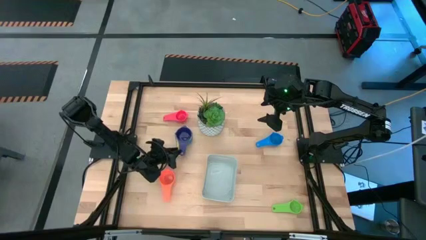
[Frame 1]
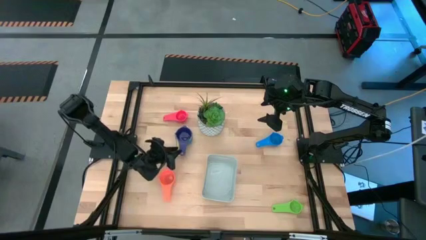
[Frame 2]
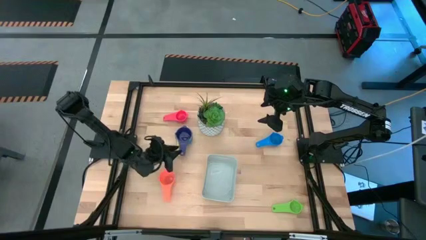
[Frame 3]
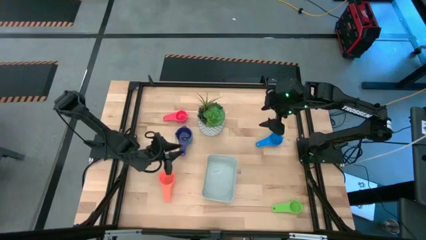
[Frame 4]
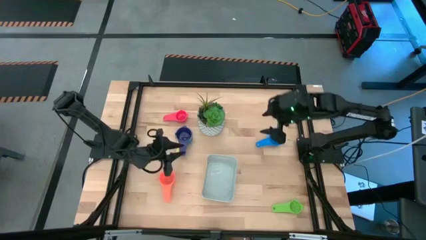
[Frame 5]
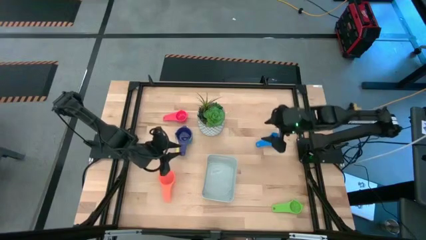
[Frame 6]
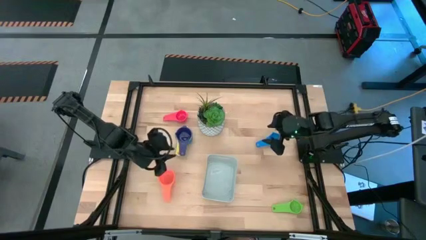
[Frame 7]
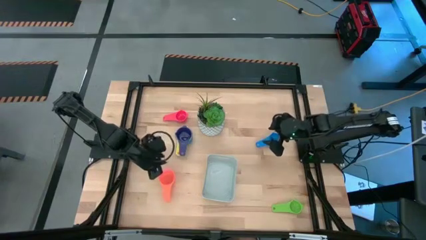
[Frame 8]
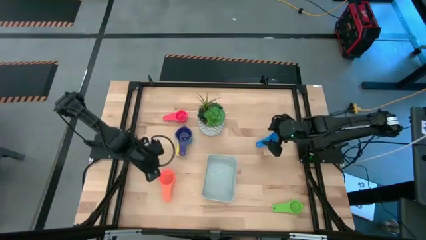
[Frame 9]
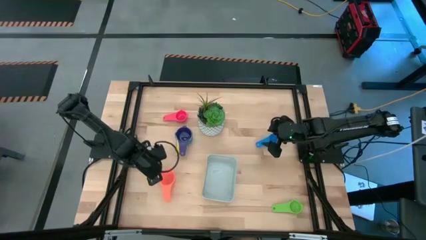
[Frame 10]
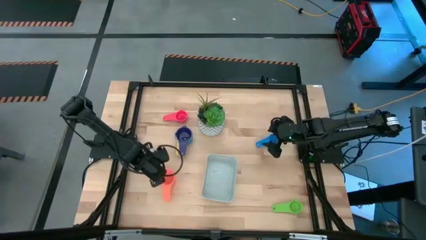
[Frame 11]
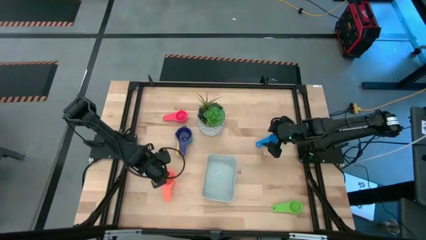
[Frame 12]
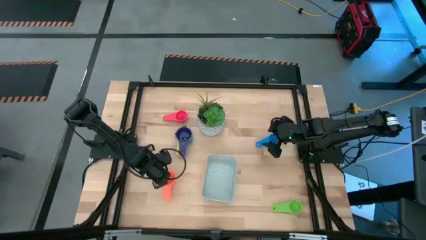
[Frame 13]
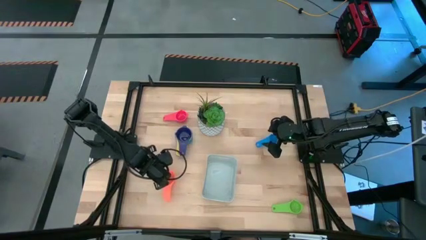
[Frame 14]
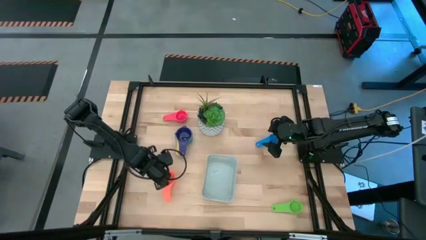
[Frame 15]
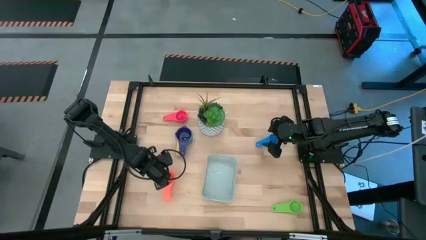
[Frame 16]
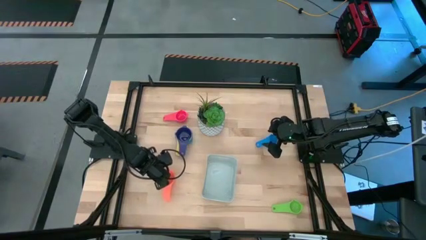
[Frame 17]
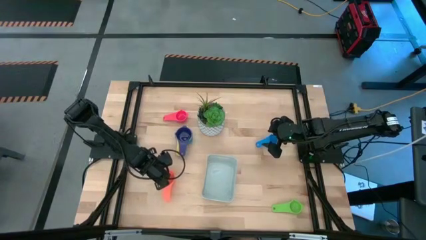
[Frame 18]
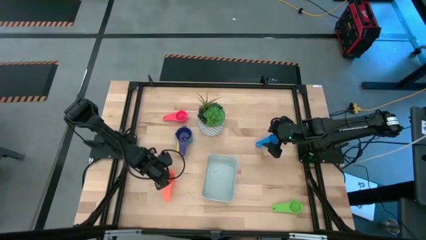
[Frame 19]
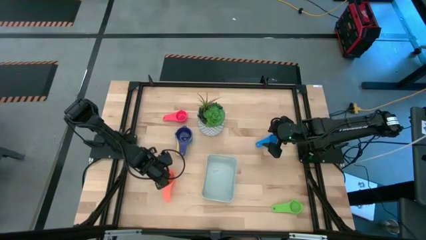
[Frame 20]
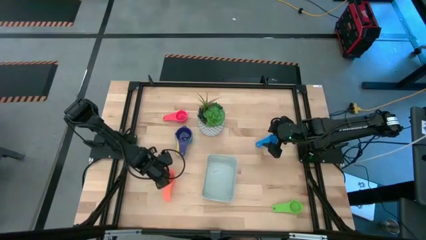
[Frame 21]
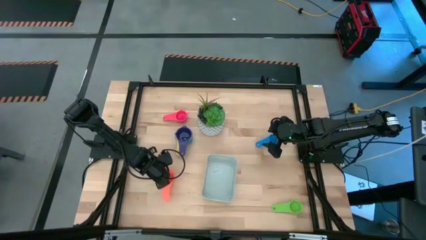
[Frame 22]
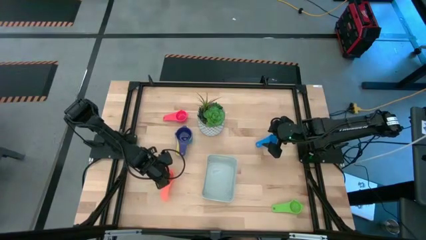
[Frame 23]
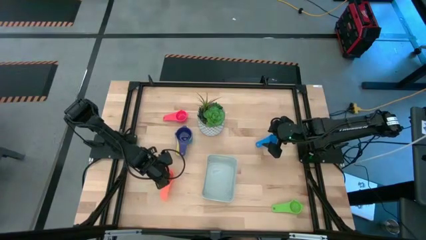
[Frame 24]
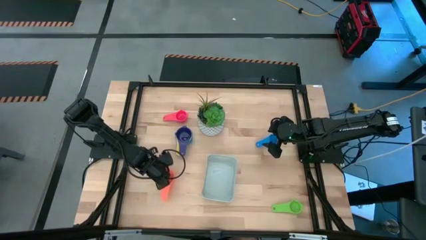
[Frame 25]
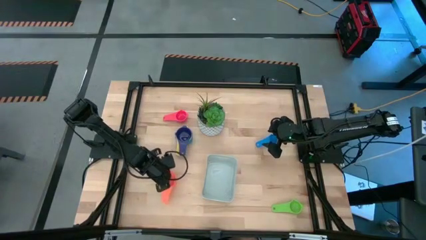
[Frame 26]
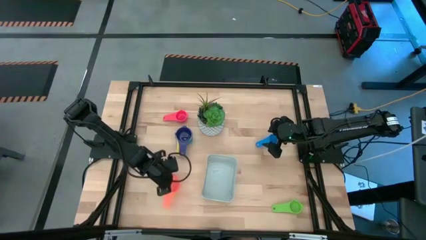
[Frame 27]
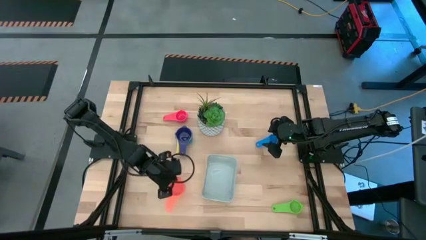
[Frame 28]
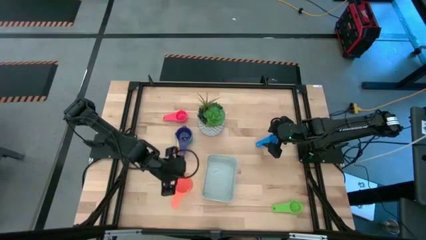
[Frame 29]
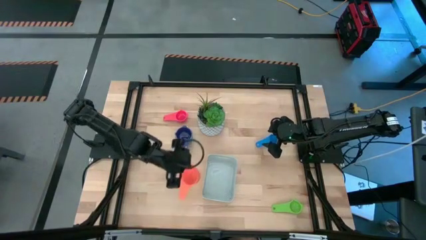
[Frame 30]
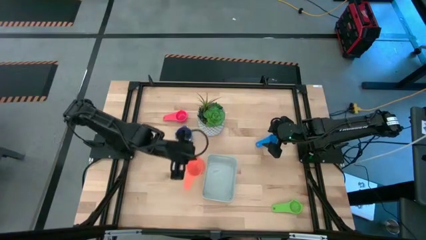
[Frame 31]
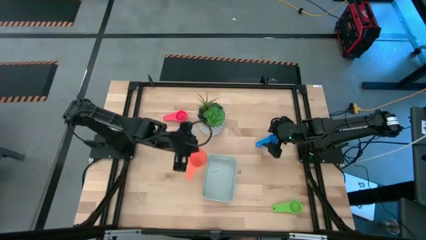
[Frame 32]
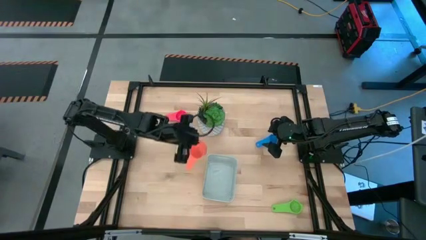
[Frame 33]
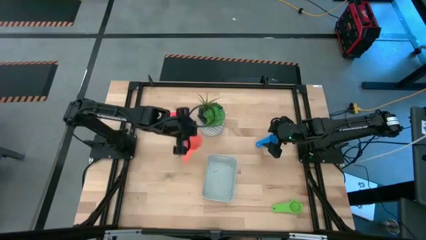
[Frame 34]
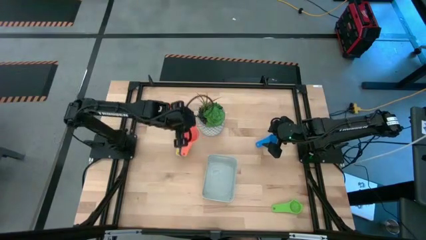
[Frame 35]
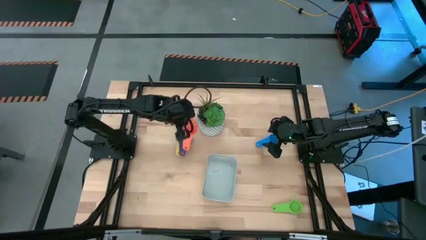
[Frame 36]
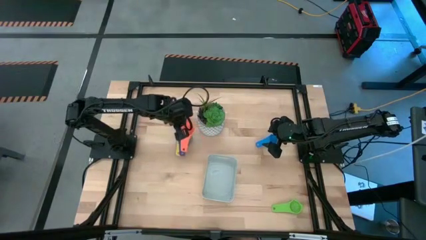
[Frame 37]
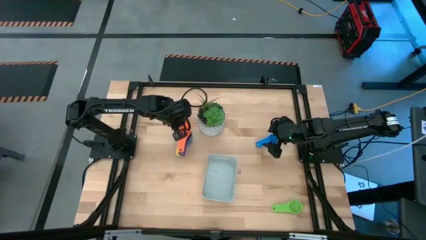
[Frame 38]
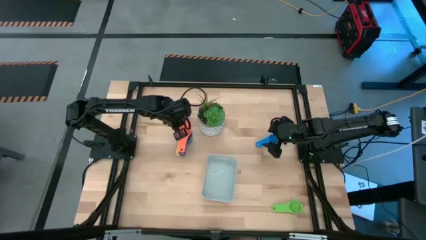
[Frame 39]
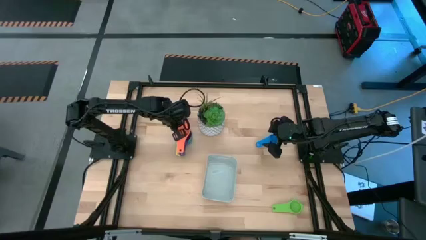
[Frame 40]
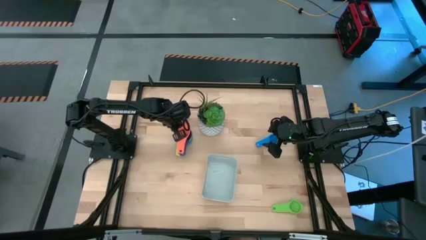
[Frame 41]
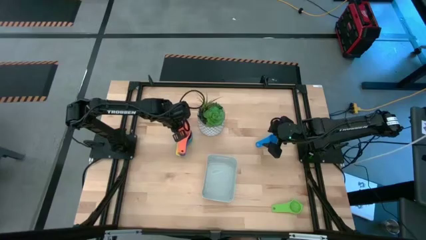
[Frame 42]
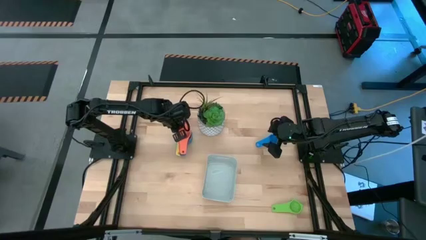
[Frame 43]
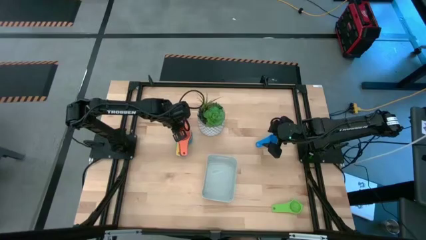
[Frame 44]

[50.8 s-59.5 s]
Task: Nest measuring cups in basket
Stack the orange measuring cup on top of the purple measuring cup

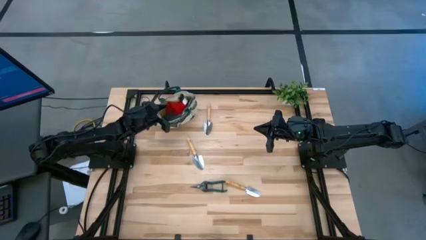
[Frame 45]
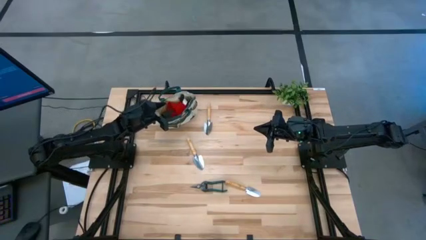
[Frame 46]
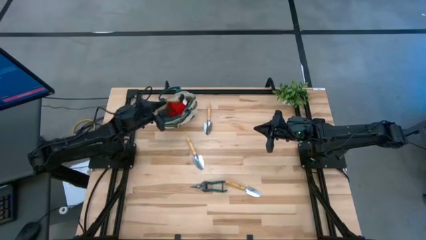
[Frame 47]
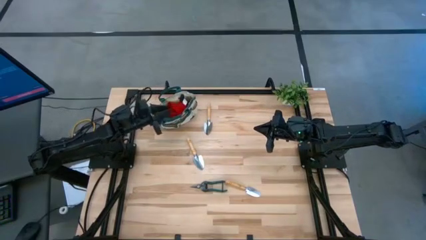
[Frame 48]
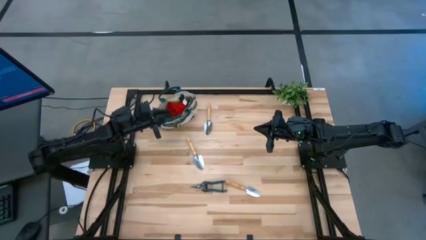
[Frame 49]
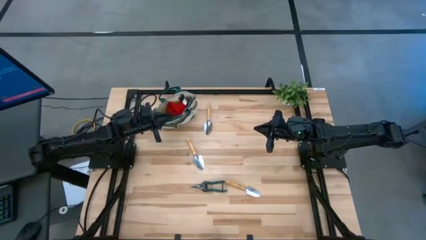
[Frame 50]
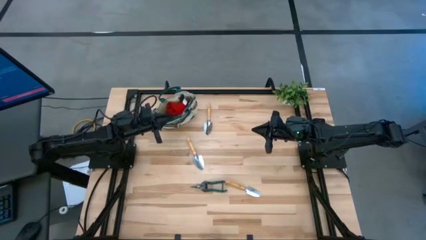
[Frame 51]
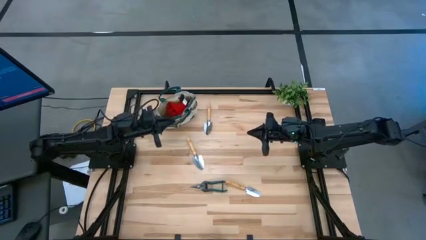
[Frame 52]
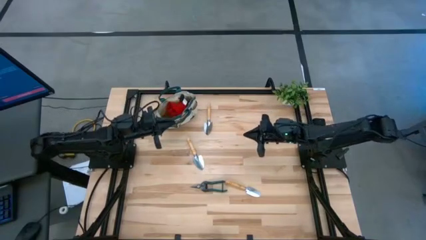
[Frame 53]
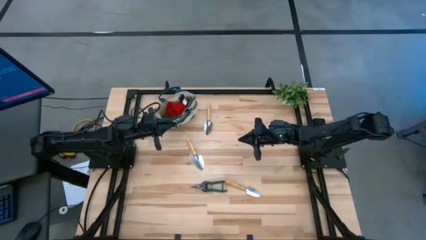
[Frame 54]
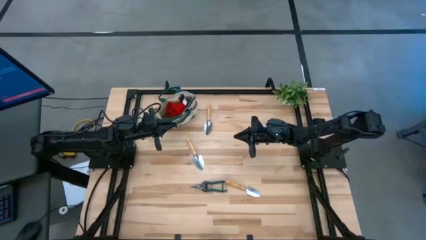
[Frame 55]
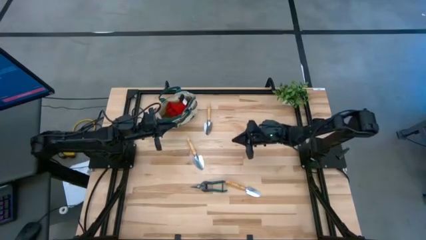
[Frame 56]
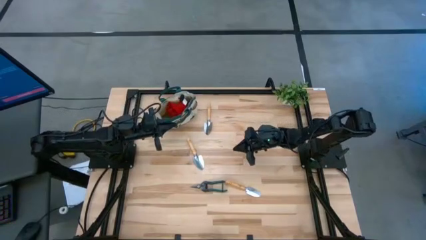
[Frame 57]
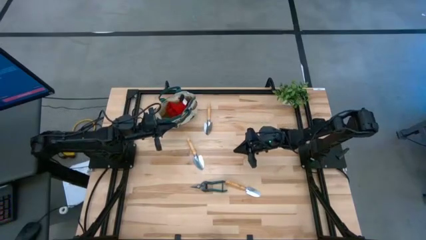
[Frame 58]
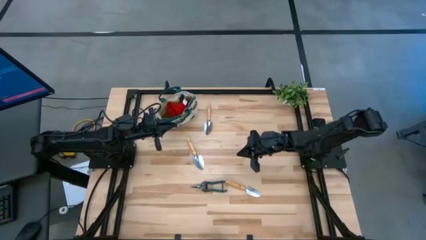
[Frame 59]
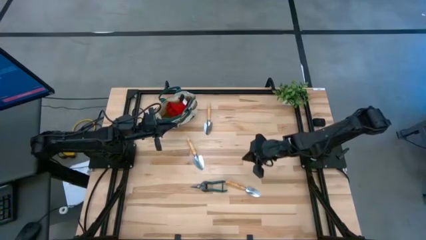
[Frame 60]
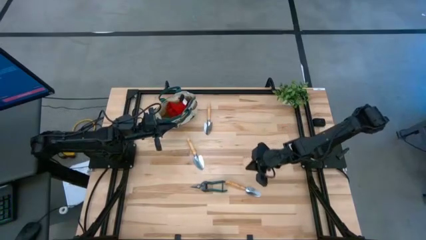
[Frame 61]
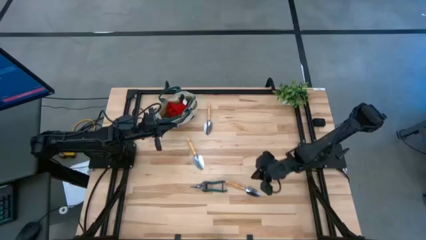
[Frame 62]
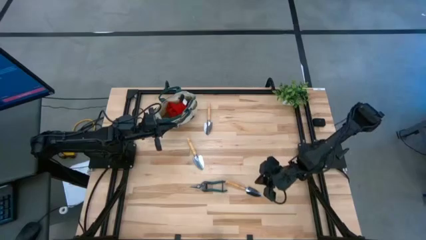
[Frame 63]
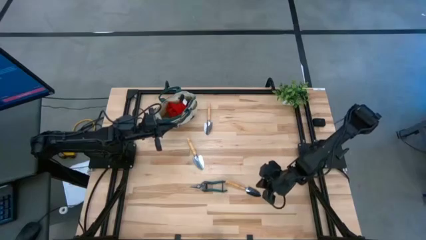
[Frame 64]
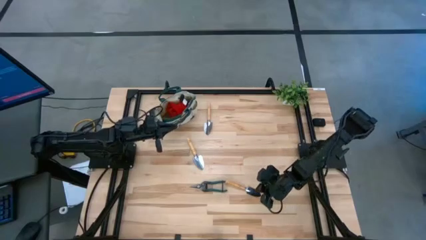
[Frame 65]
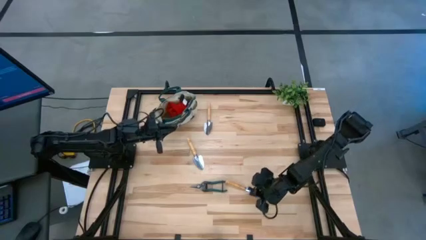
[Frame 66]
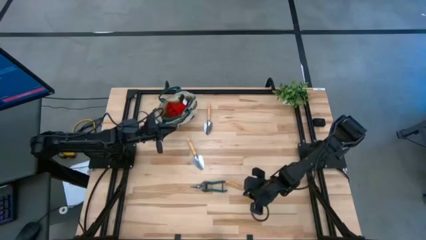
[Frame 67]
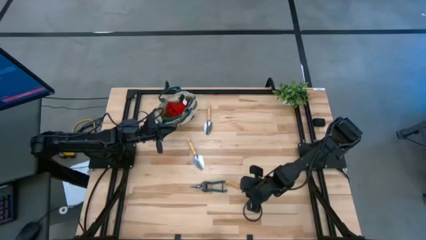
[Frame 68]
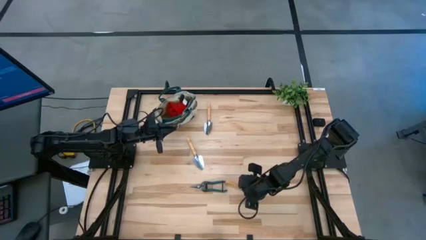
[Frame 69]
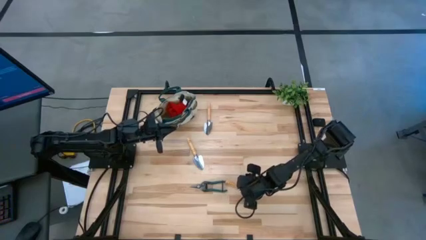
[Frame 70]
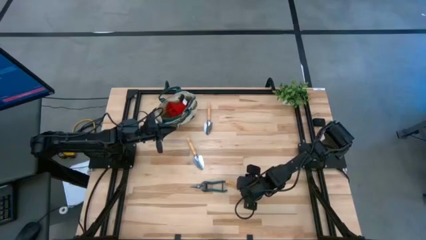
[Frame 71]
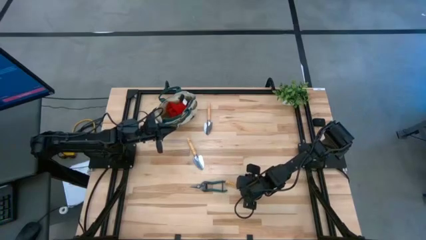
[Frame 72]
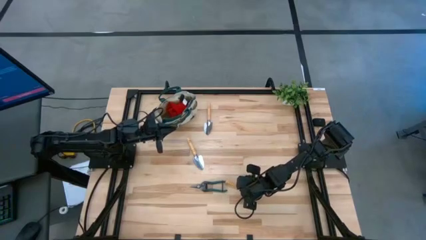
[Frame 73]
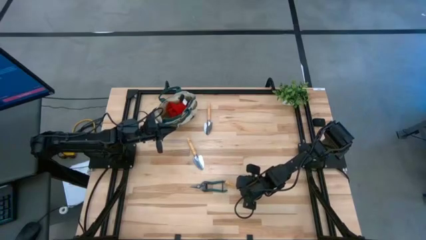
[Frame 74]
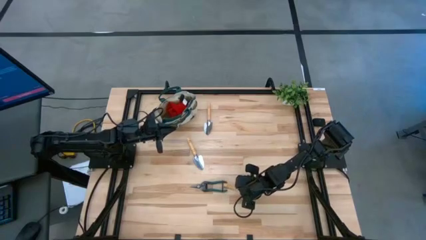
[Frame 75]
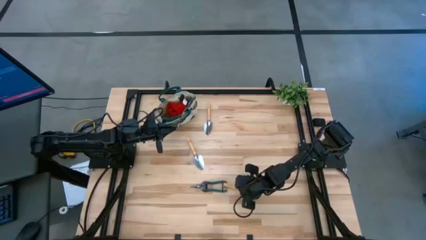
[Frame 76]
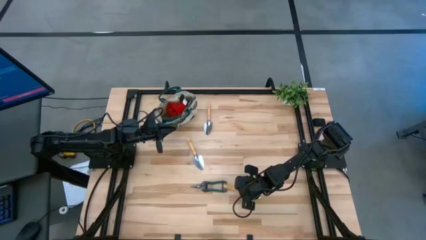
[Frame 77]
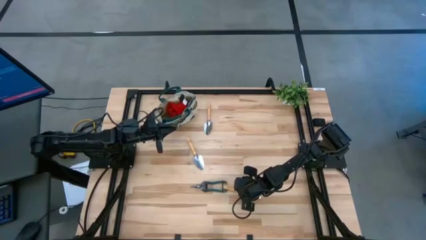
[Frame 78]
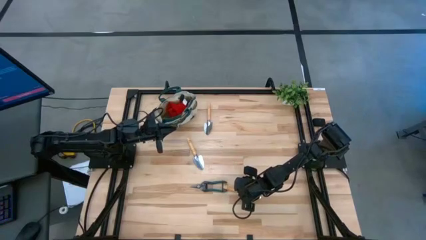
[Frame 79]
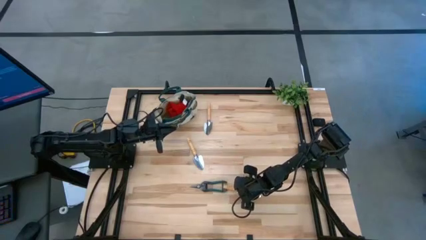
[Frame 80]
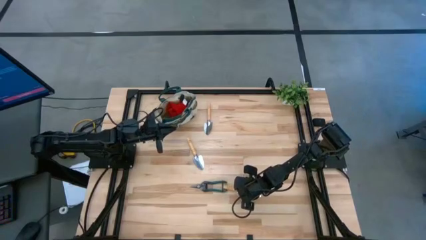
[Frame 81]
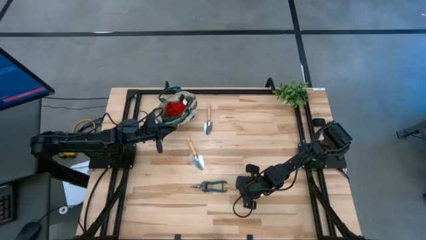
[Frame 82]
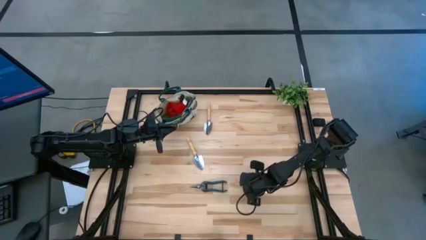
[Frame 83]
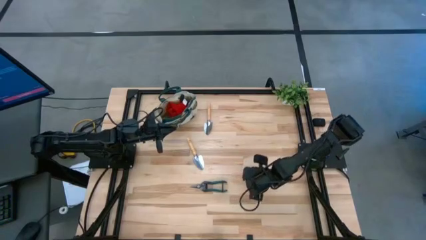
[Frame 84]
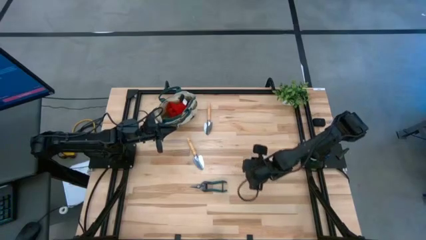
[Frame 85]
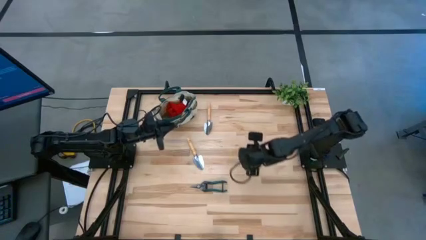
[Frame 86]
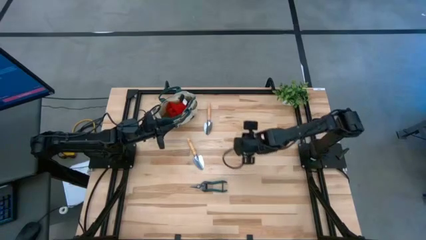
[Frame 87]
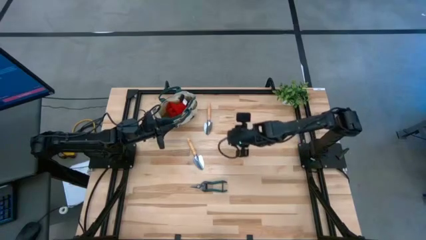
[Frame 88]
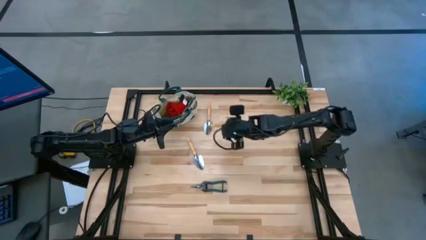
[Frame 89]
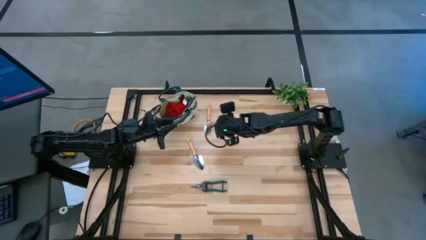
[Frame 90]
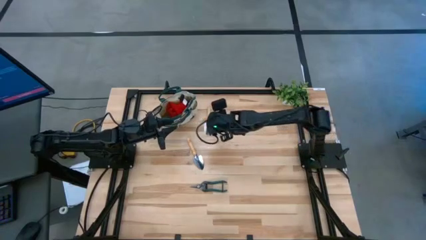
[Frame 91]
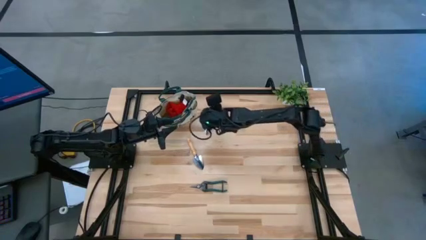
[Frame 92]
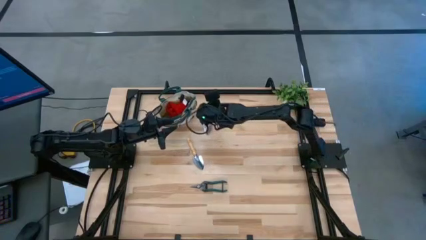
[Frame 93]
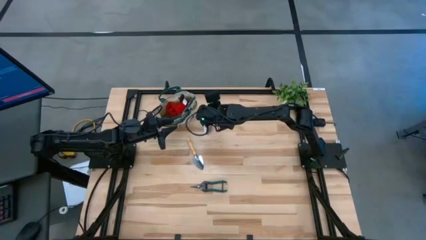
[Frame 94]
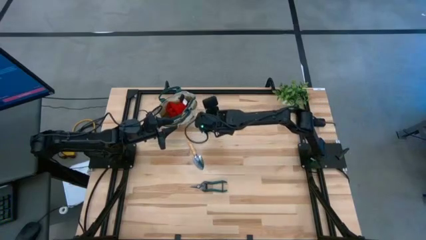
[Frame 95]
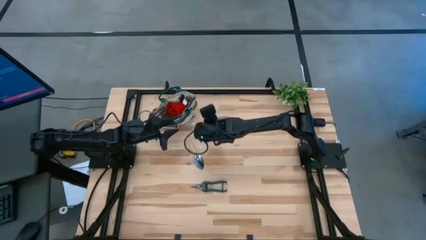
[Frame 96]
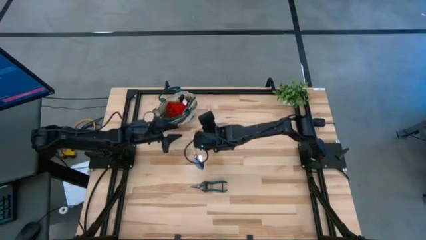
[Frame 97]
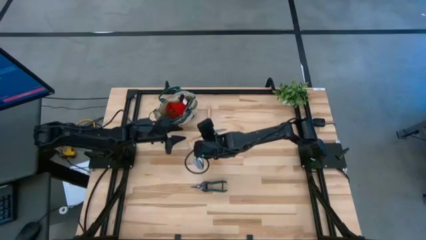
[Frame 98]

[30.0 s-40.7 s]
Task: Pick & Place Garden tools in Gardening bag
Put the bottom brown trowel into the yellow gardening bag
